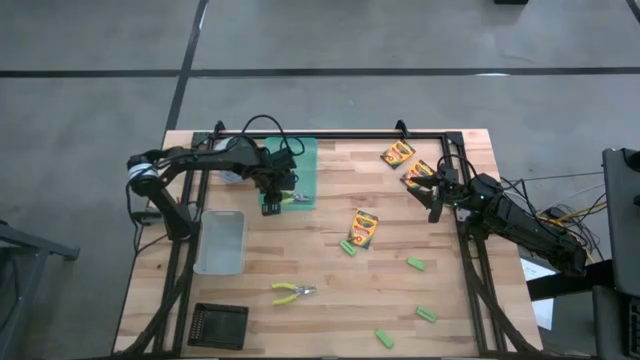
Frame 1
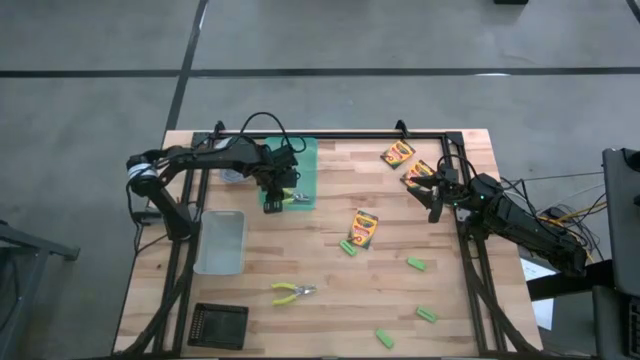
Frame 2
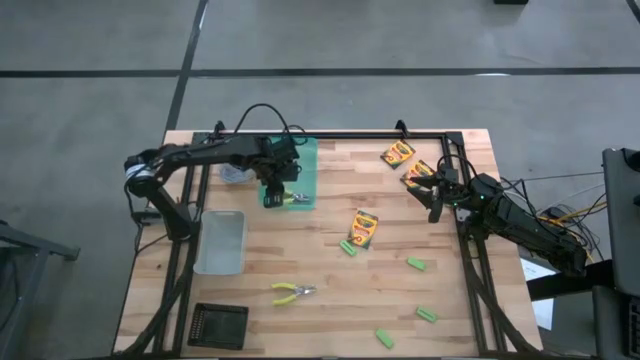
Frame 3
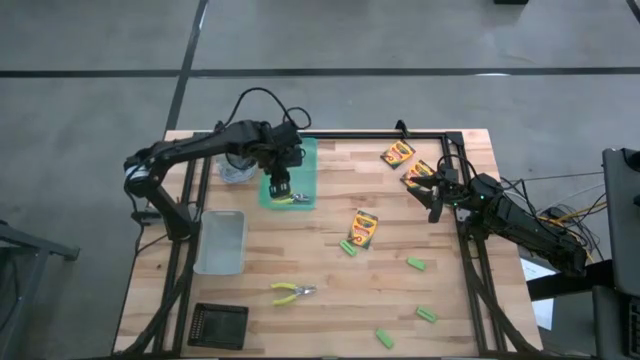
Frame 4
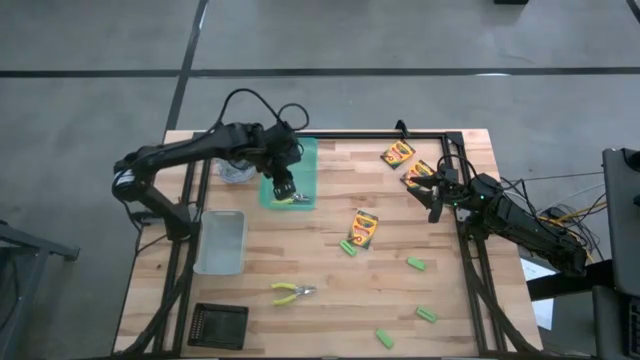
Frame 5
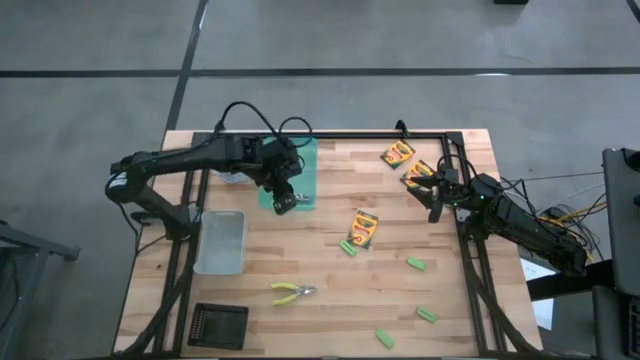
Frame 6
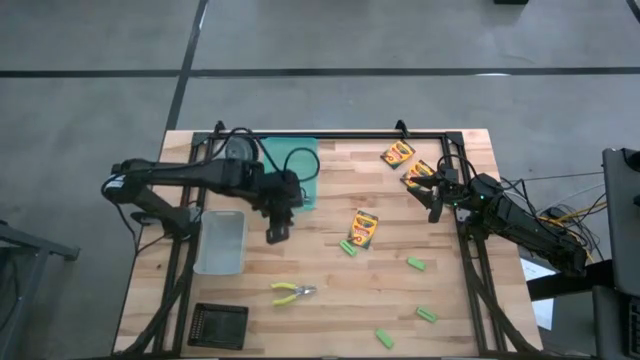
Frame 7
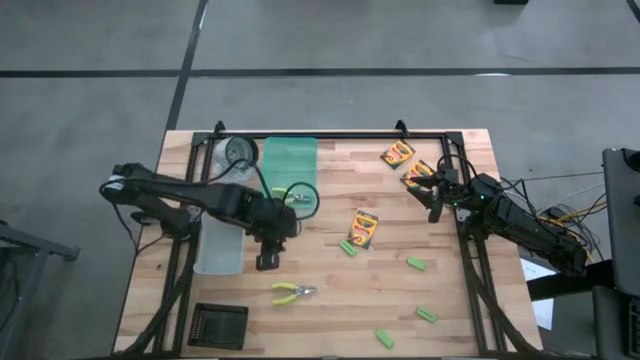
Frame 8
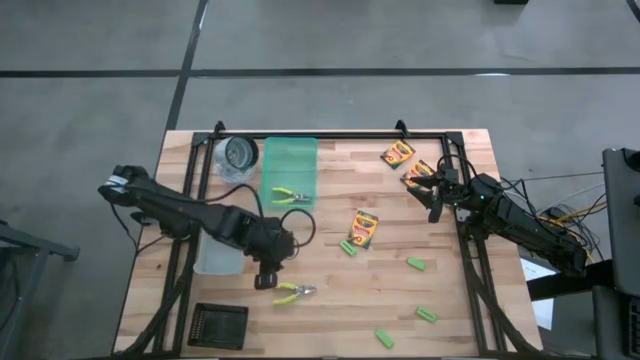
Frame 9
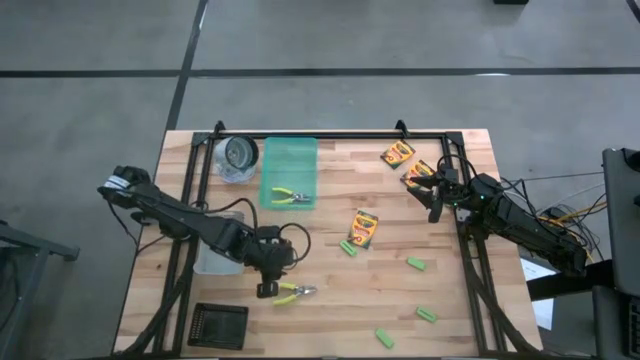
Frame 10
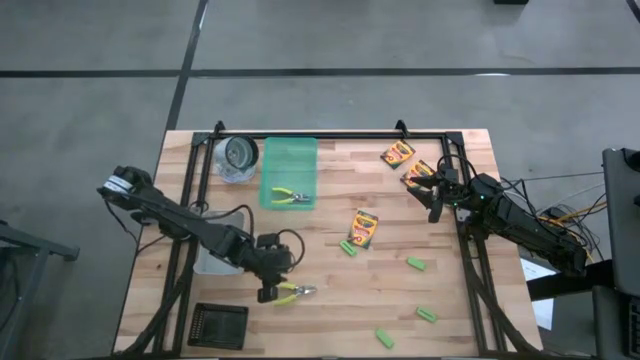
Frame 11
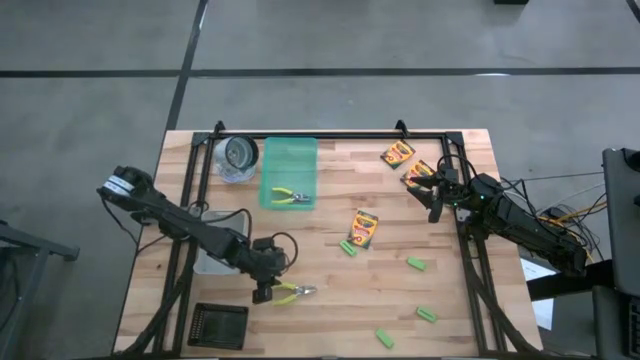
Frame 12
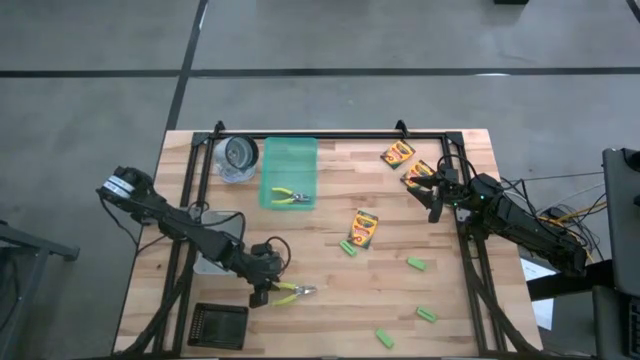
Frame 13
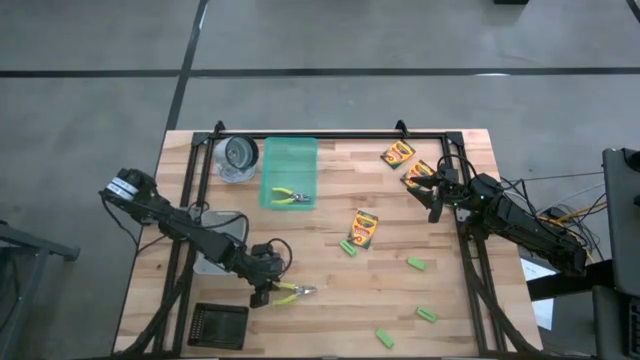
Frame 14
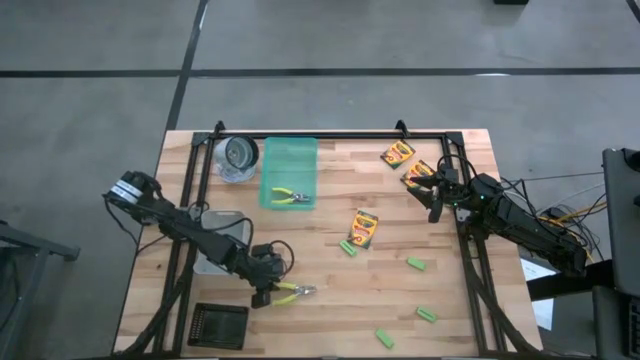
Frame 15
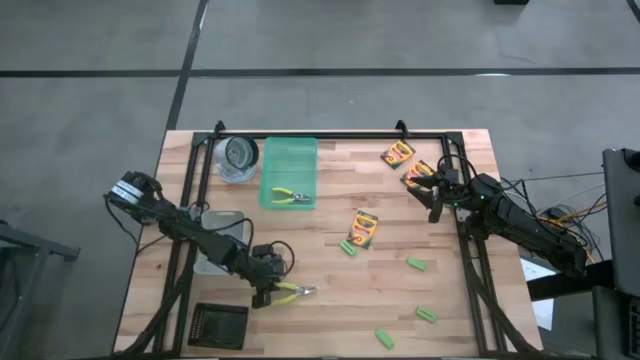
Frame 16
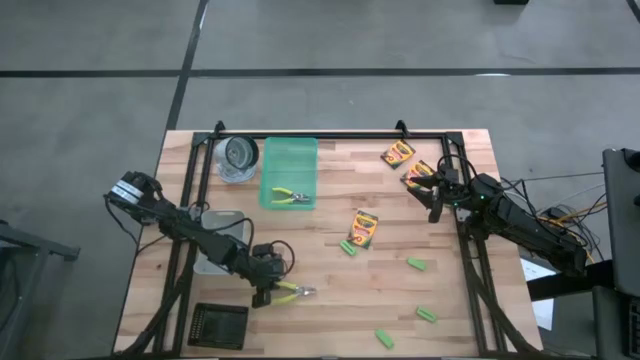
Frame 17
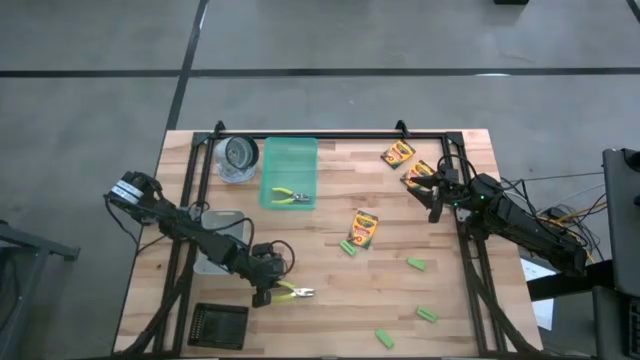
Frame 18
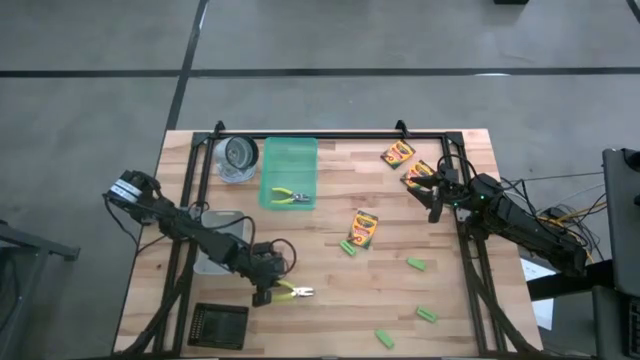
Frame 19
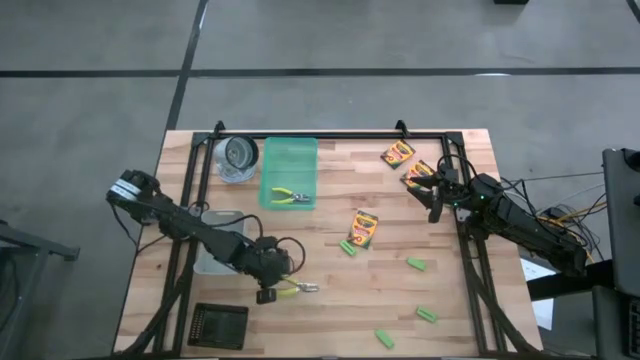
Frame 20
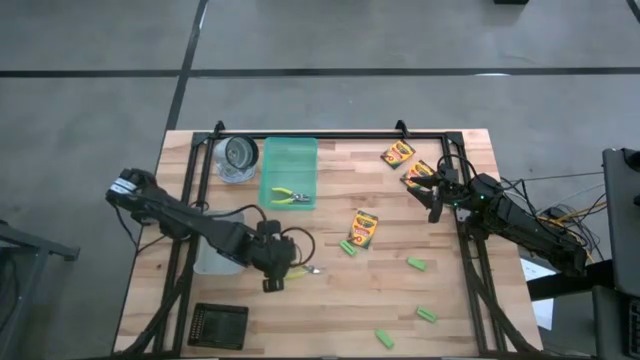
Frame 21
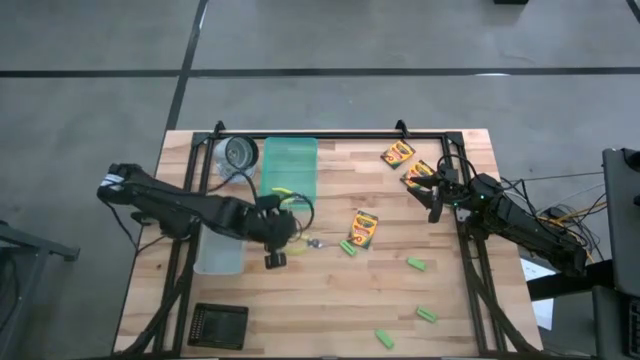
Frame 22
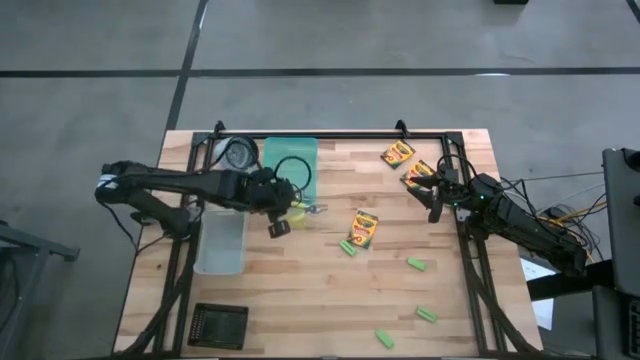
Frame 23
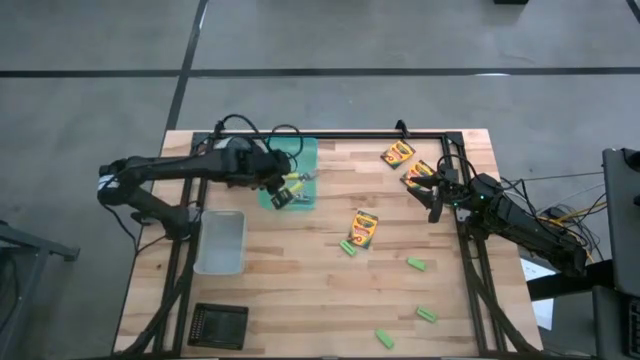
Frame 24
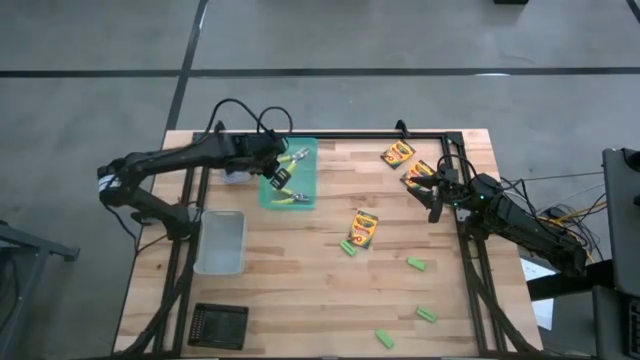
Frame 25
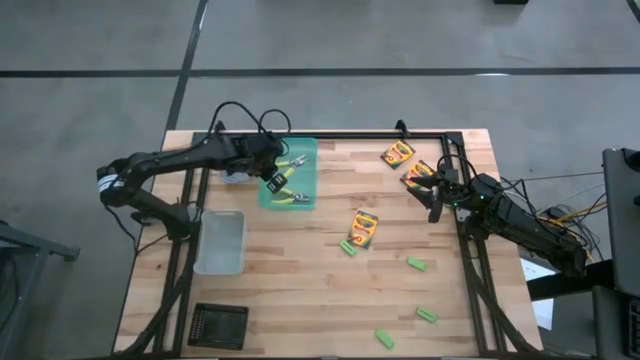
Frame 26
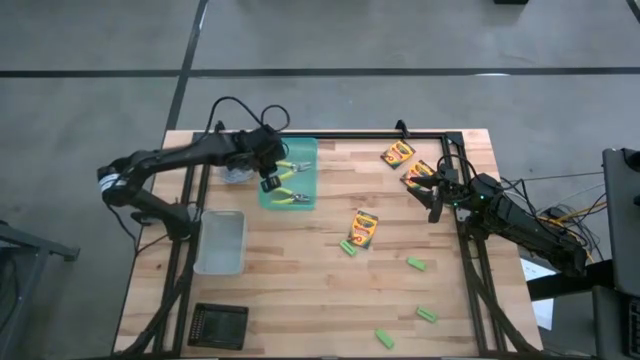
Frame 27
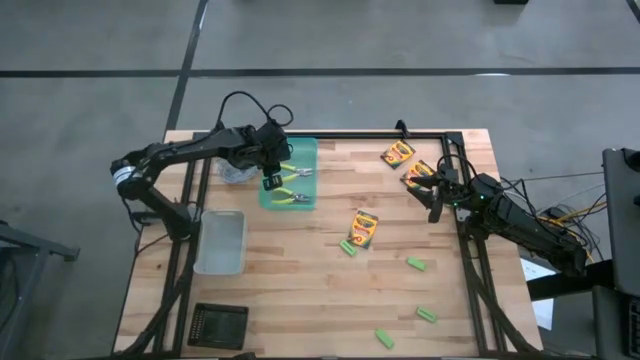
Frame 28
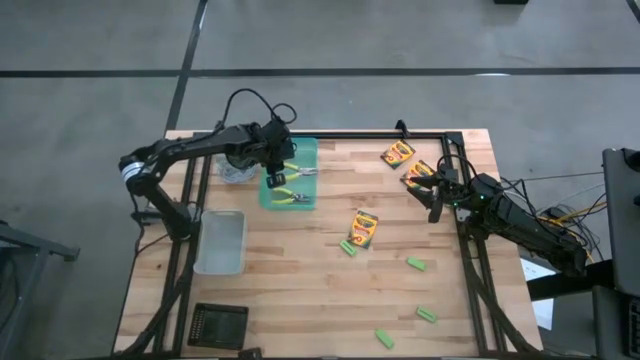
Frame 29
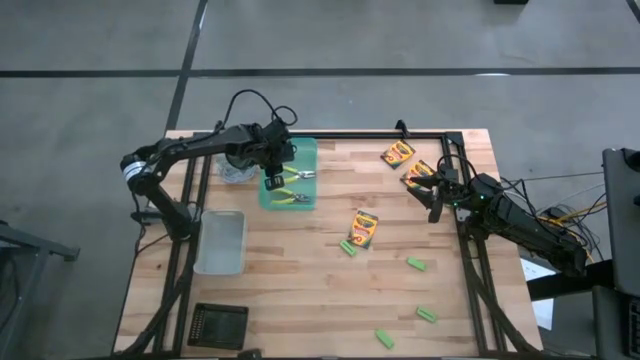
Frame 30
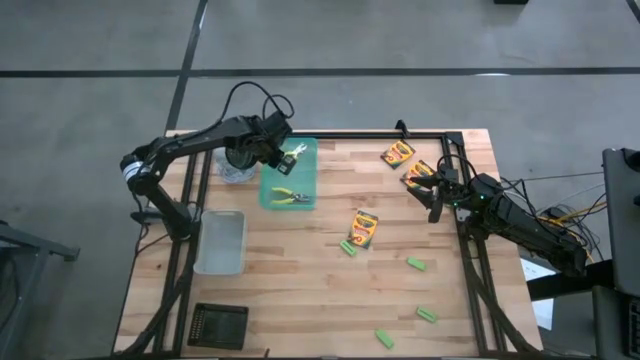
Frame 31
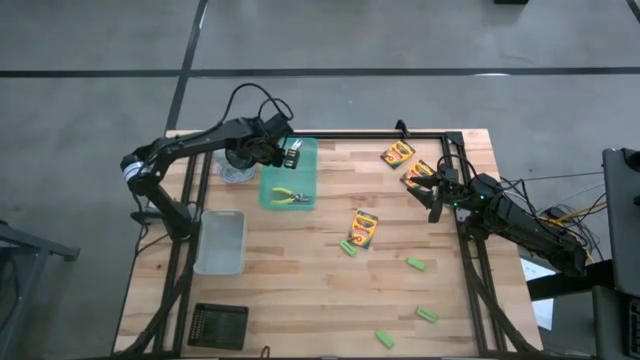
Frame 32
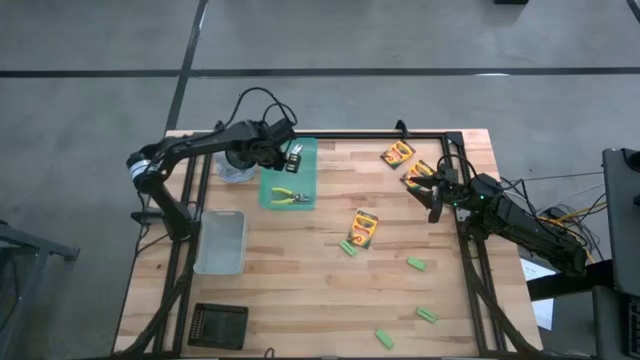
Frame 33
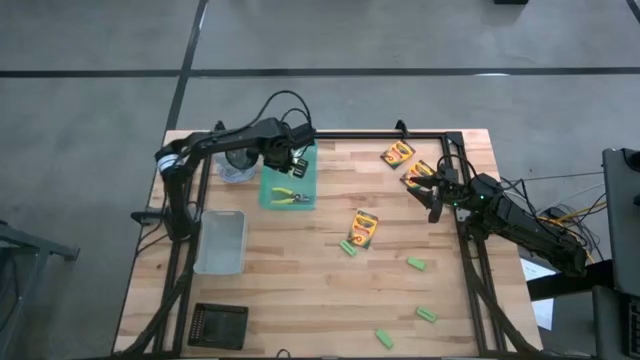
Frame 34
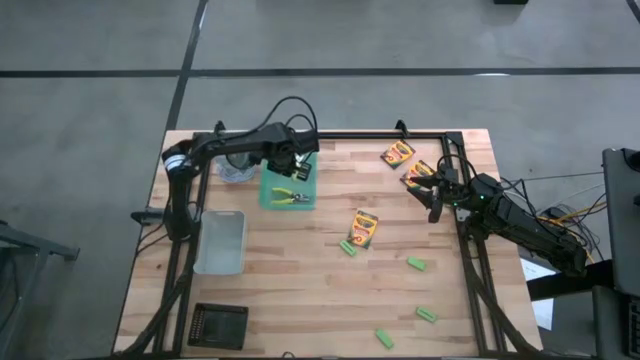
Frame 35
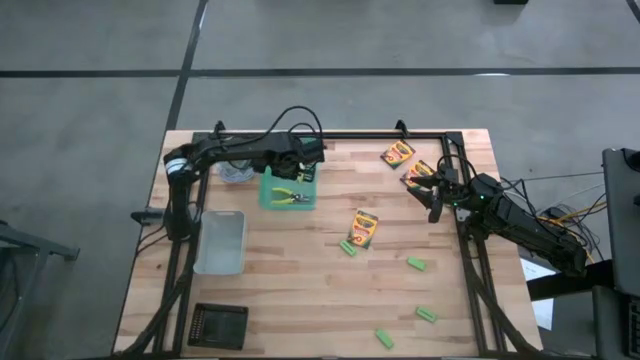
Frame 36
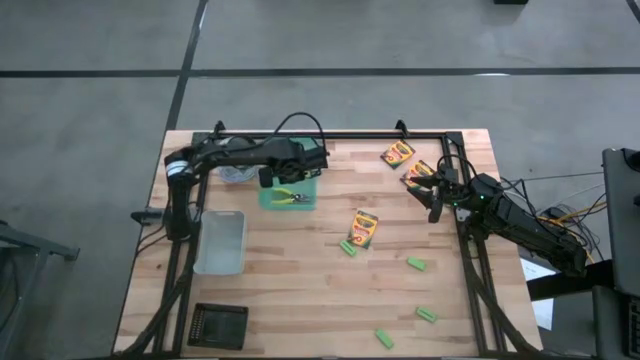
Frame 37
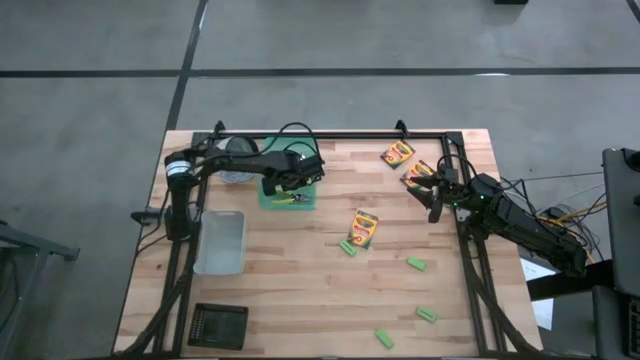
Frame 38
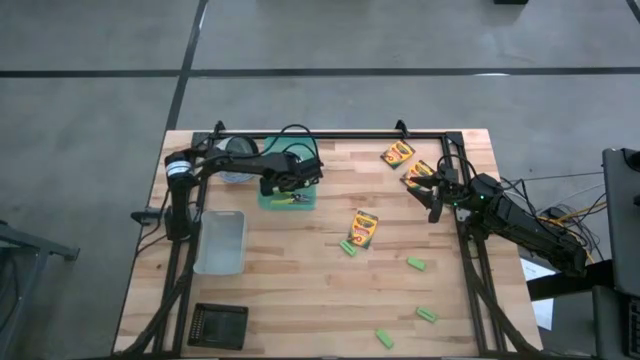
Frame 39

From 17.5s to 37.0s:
Task: Pick & Place School Supplies
Put the green punch plier into the green bin
